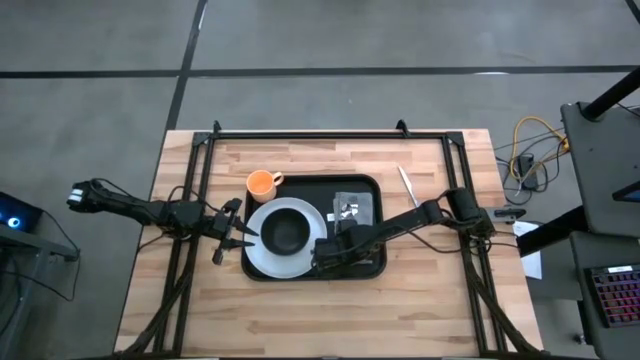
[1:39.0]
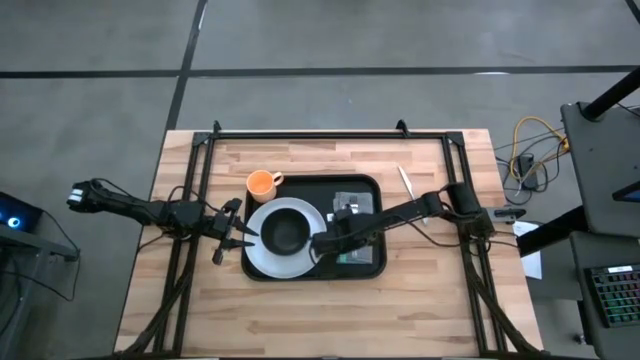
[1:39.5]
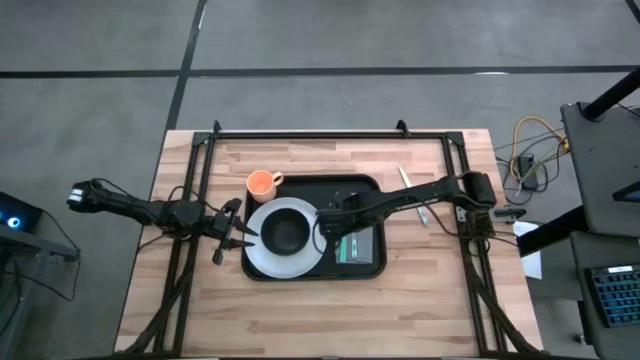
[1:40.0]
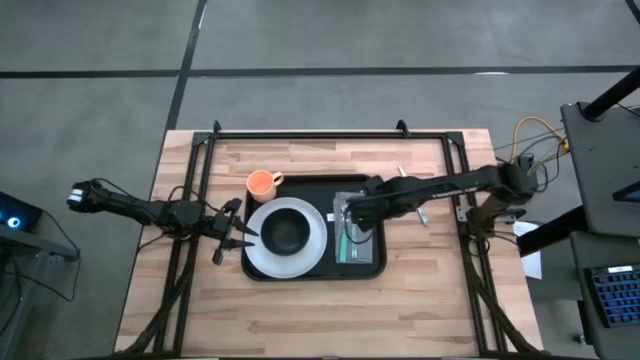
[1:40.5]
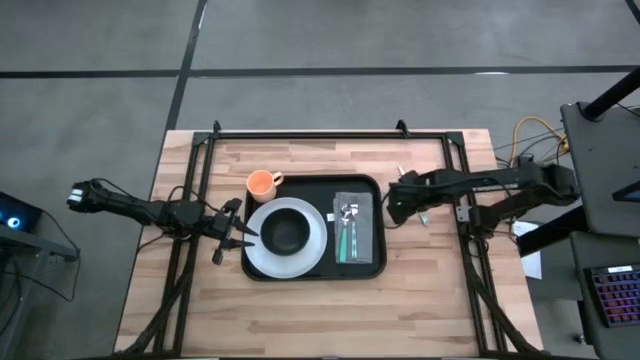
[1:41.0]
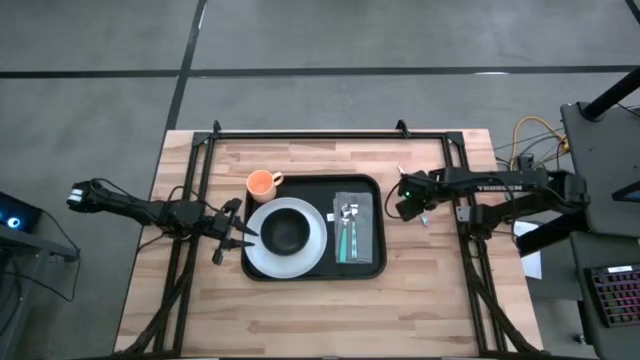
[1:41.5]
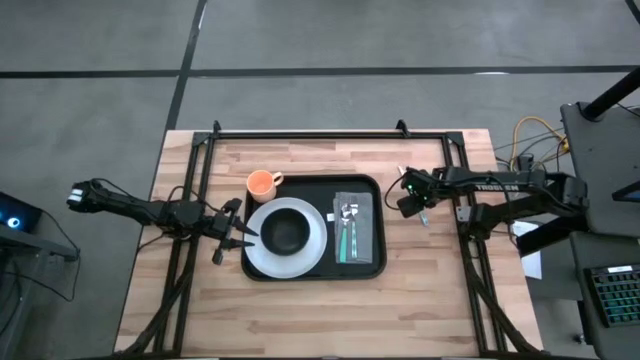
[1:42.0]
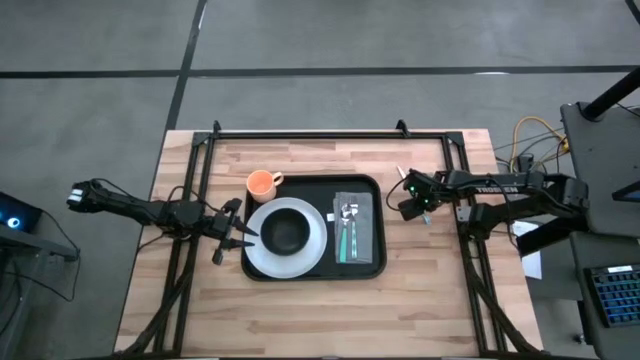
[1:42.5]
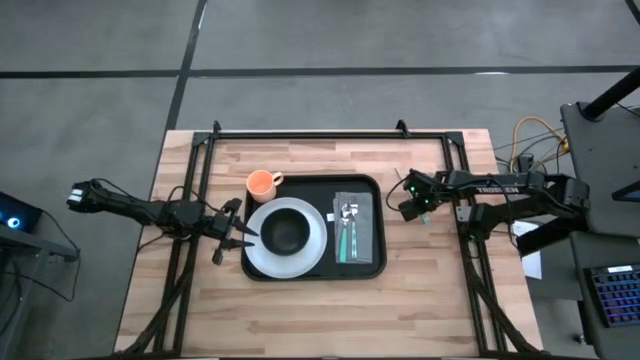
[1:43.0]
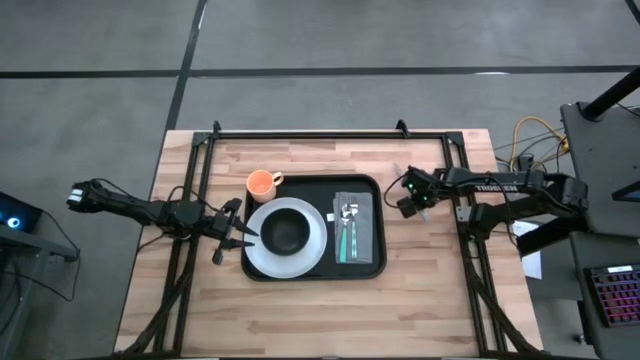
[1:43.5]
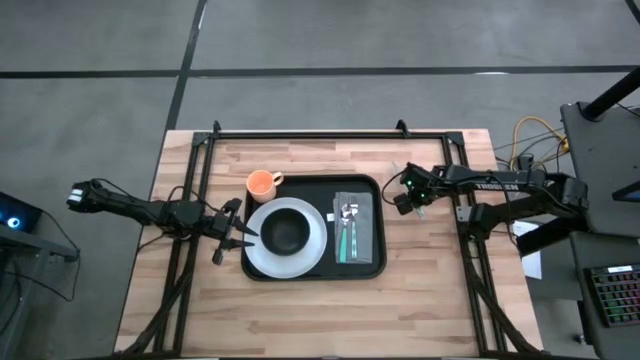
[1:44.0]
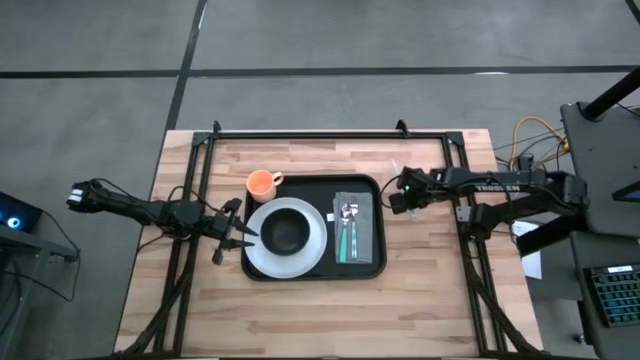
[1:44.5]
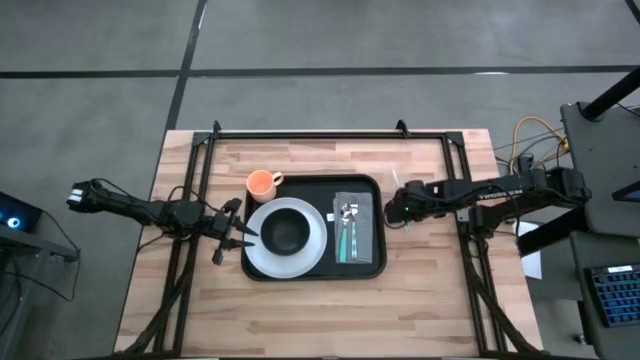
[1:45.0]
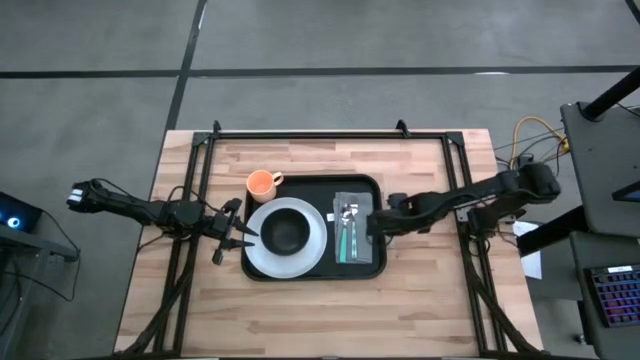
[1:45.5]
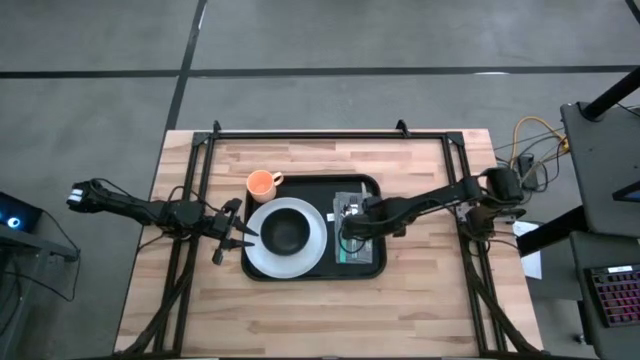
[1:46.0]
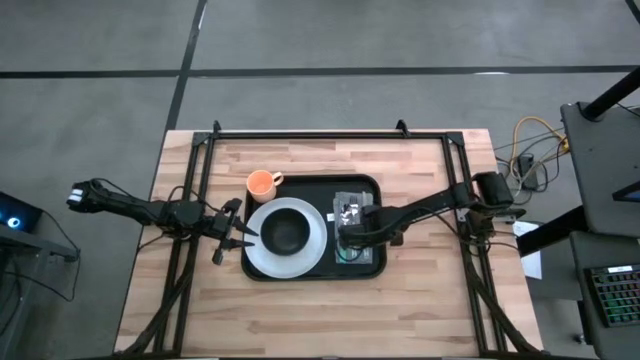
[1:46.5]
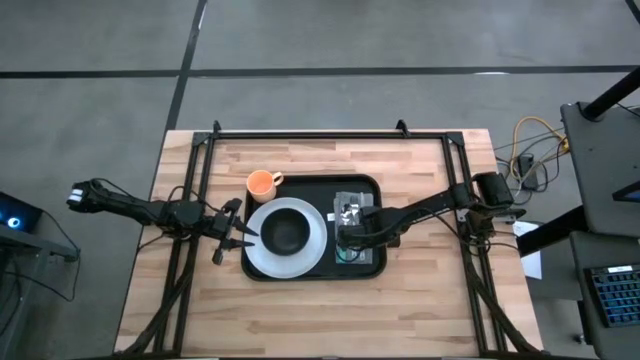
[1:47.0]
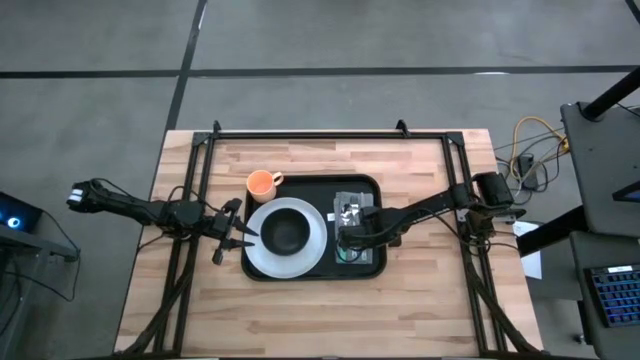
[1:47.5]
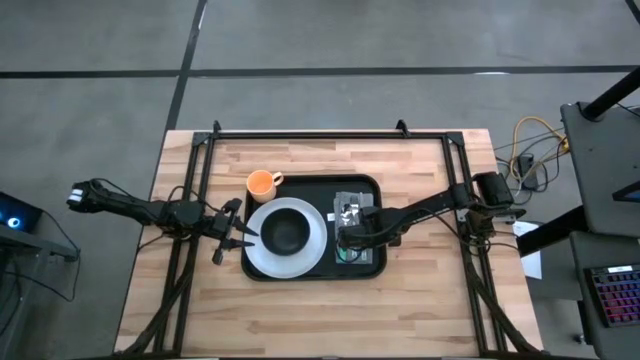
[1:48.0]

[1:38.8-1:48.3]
Task: Set up tray
Put the white and blue knife to the right of the white and blue fork on the gray napkin on the black serving tray

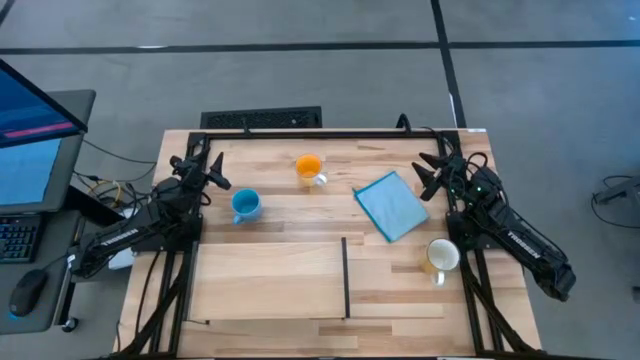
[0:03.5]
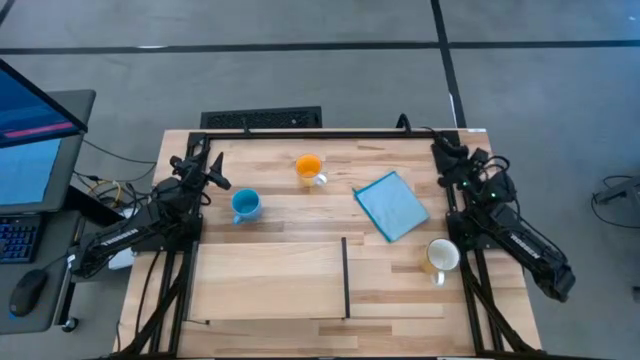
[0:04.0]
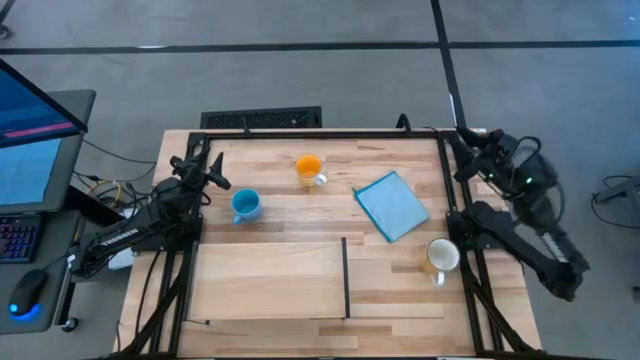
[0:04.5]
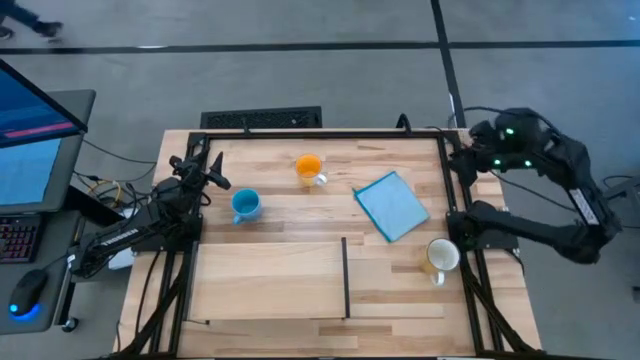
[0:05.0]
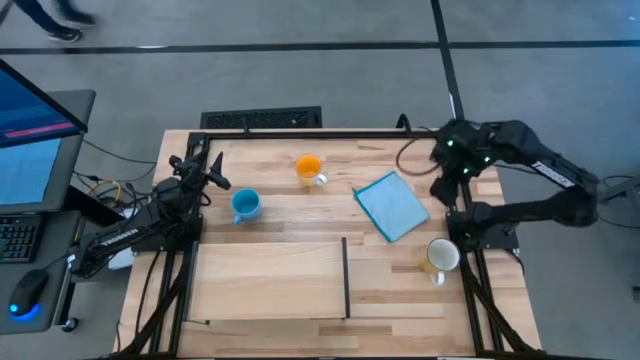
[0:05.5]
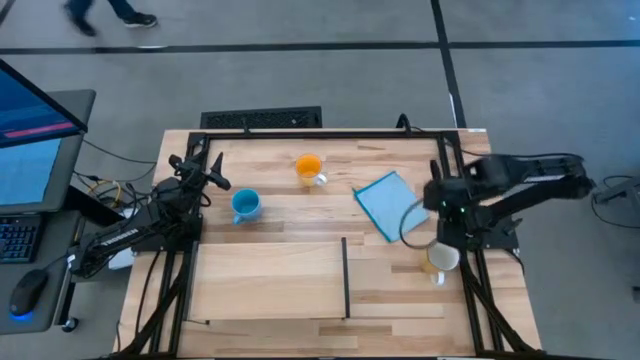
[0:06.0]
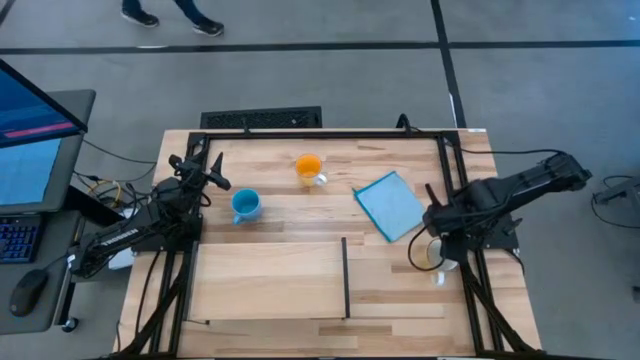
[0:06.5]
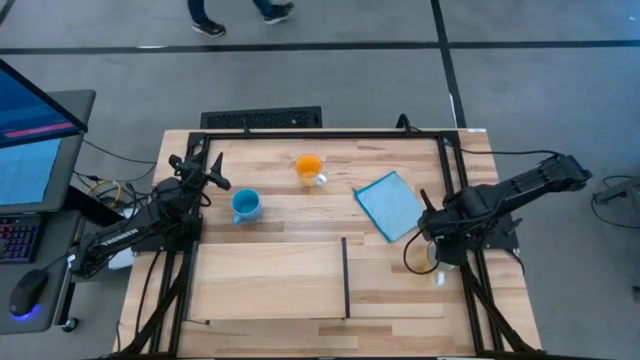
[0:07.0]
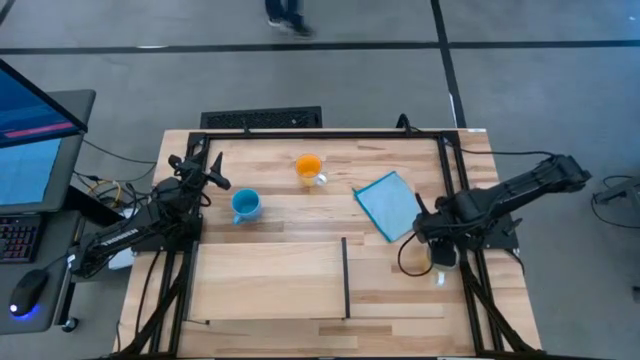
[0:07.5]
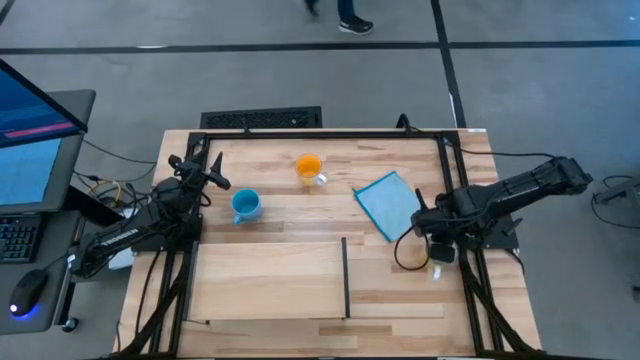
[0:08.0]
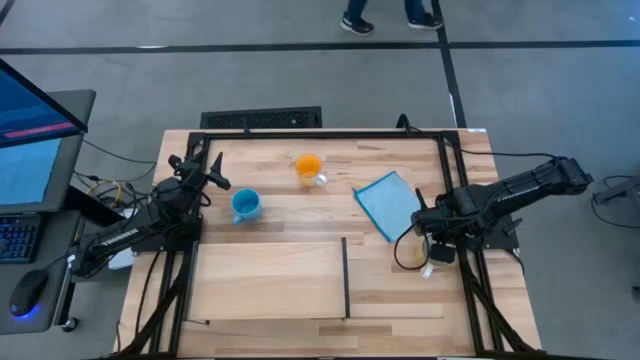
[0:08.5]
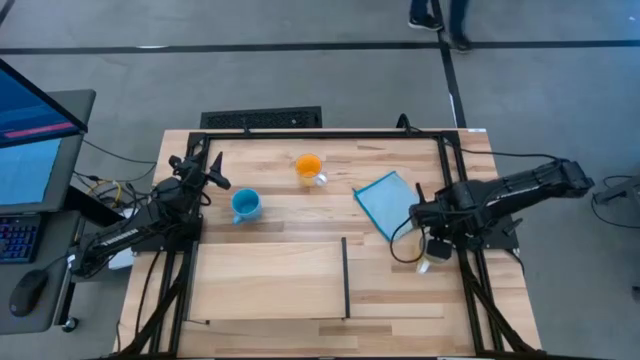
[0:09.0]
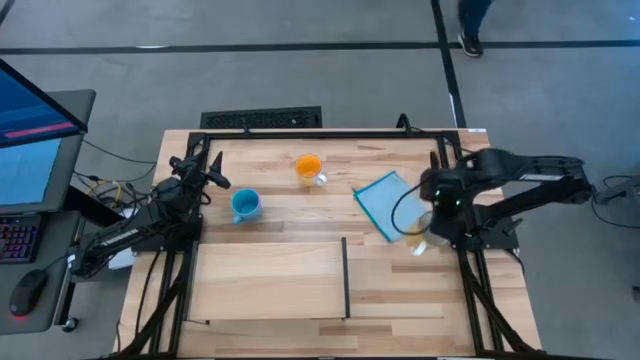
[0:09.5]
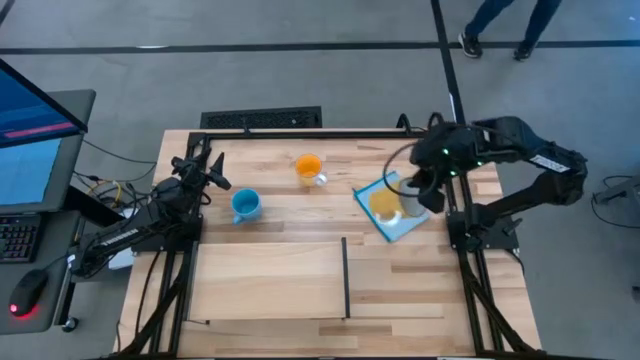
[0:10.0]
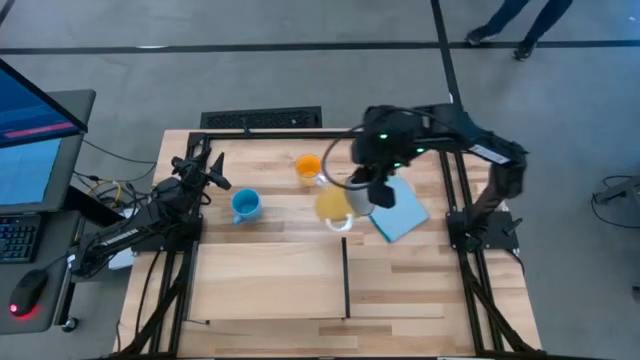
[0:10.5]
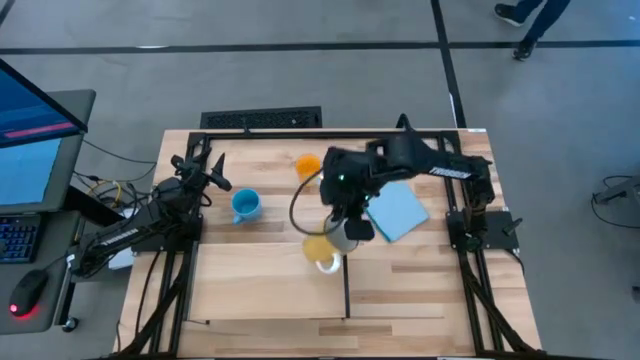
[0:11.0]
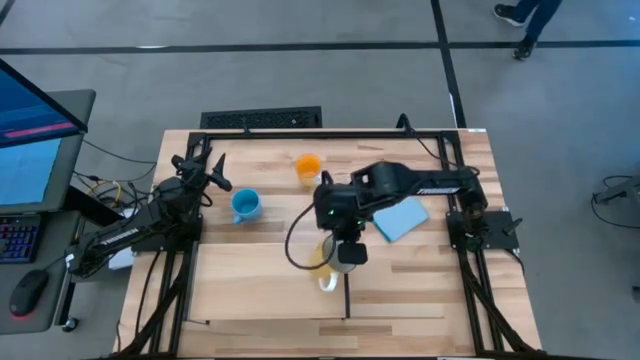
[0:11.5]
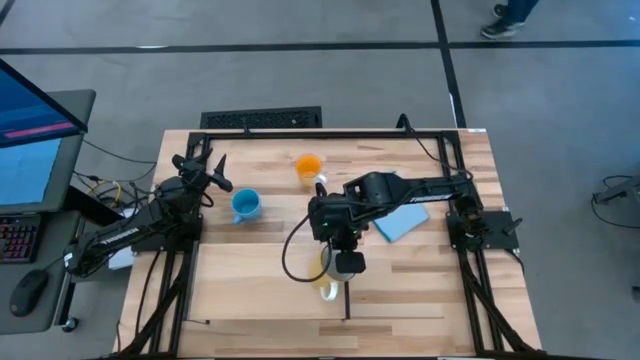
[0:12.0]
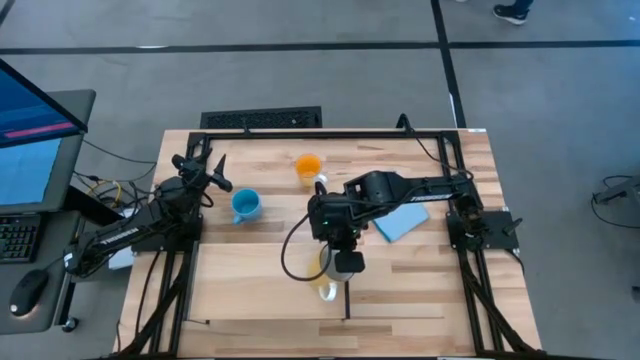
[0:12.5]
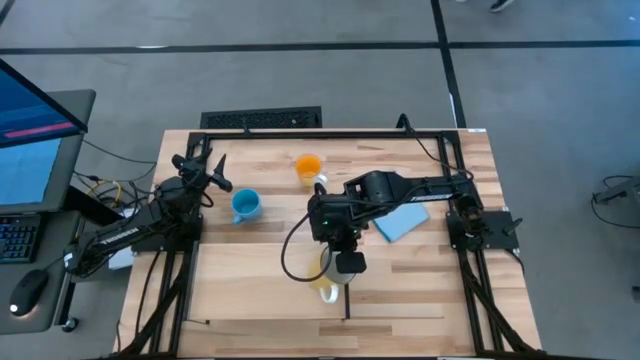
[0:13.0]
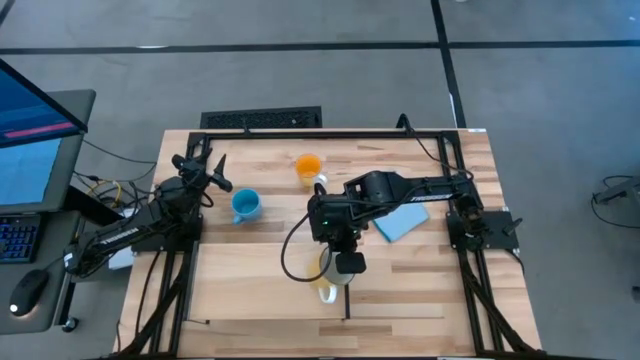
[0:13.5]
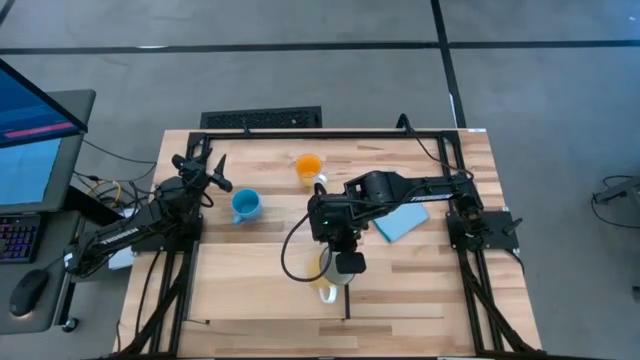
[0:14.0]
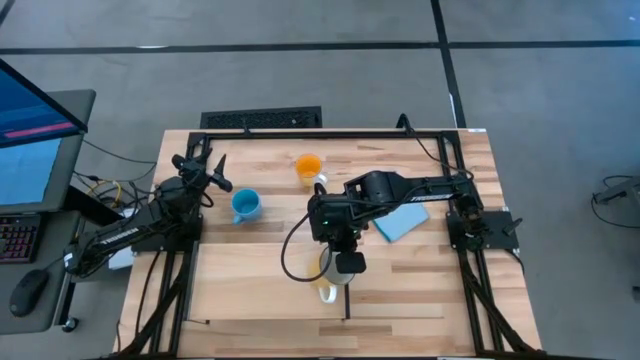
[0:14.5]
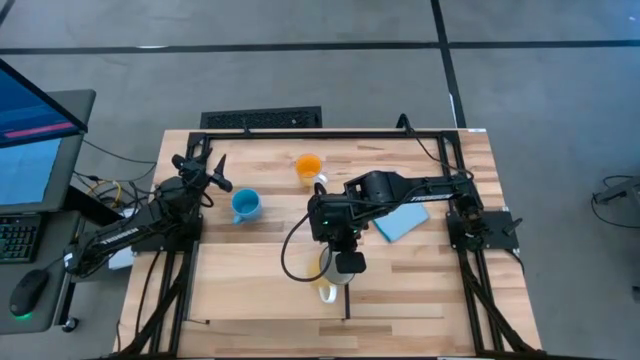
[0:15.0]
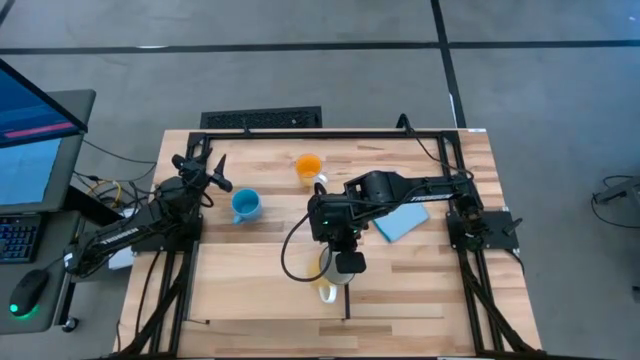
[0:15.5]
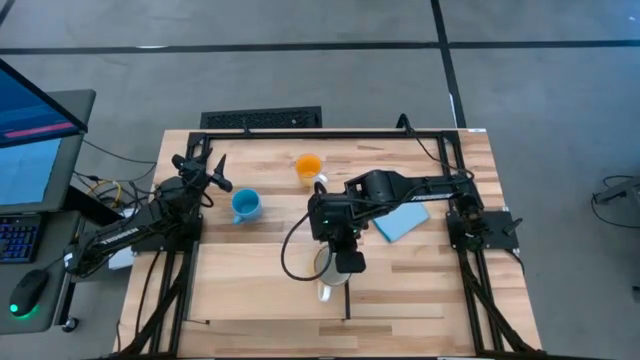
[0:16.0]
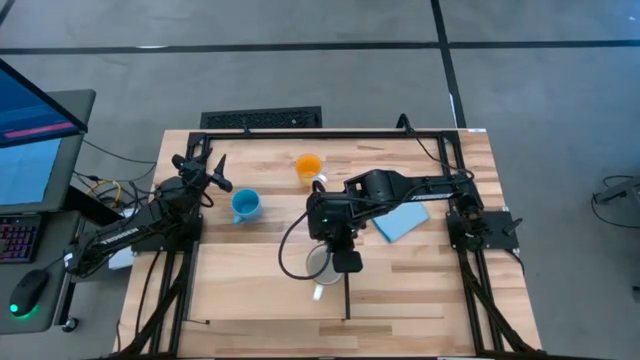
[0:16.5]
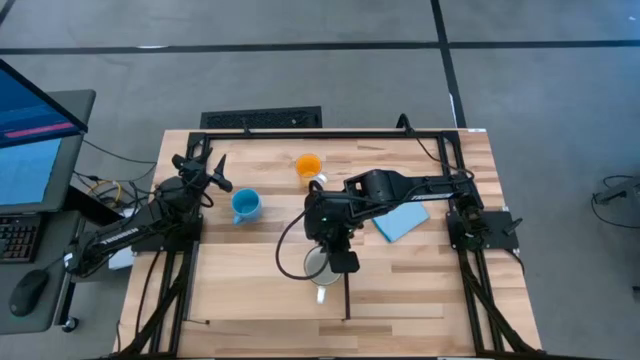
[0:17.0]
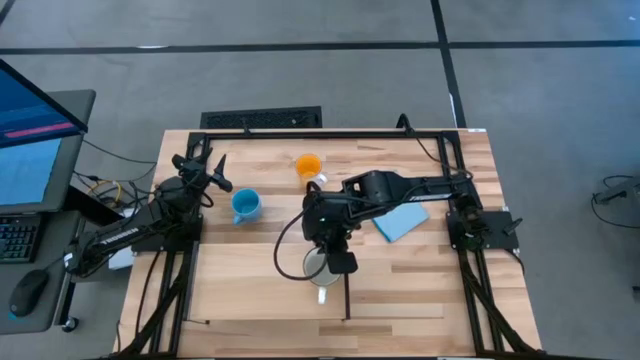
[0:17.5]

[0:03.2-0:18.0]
Task: Stack small to large cups/mugs on shelf
Put the yellow mug on the shelf
